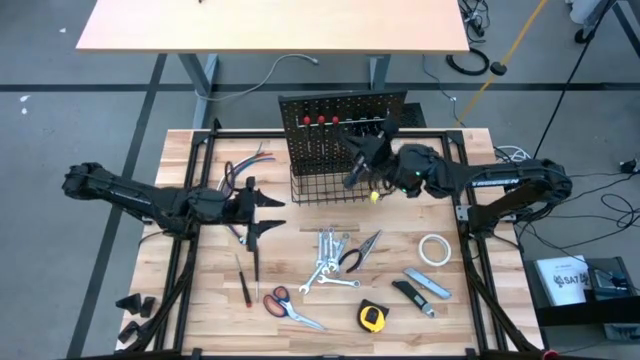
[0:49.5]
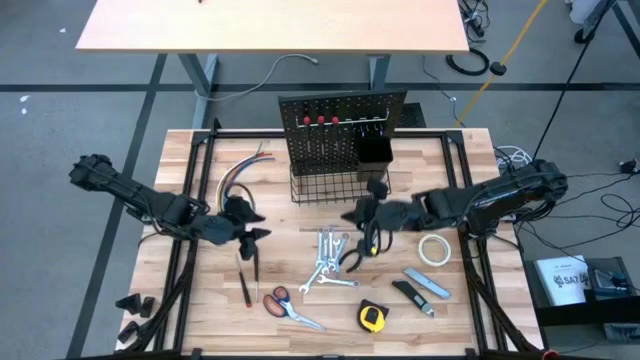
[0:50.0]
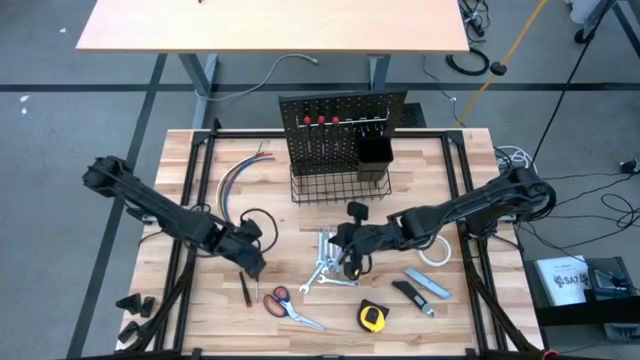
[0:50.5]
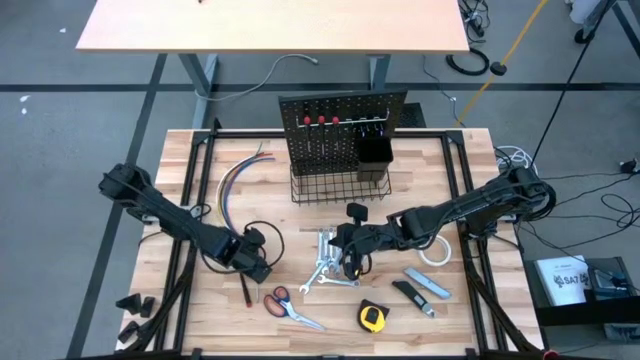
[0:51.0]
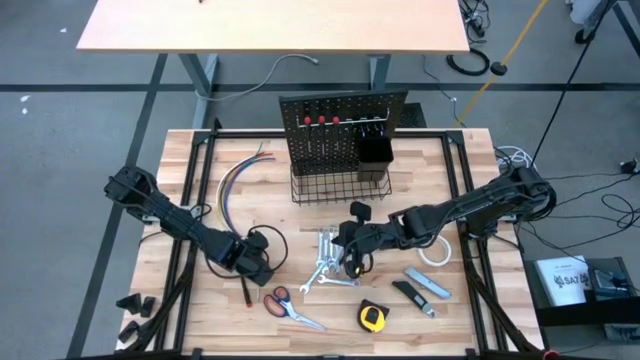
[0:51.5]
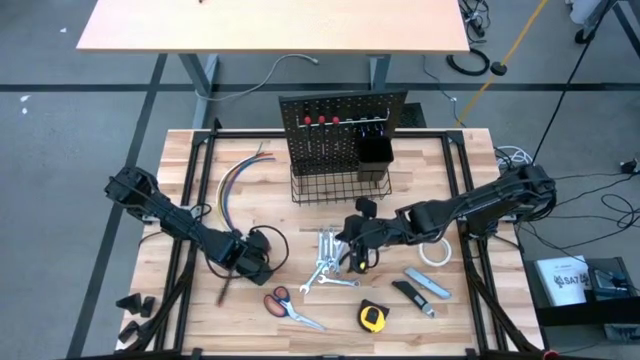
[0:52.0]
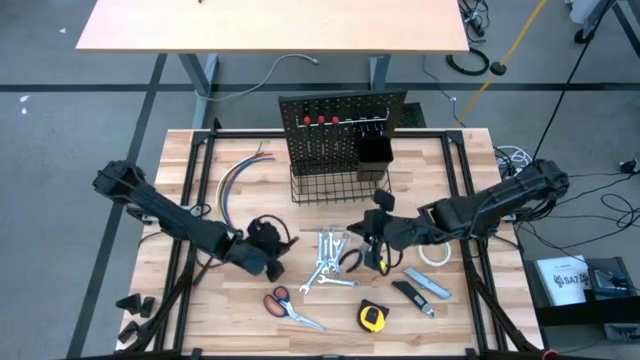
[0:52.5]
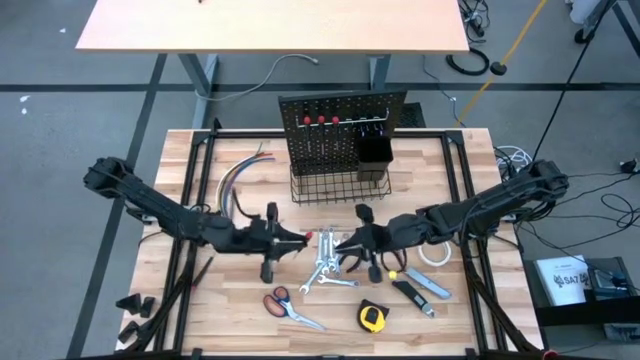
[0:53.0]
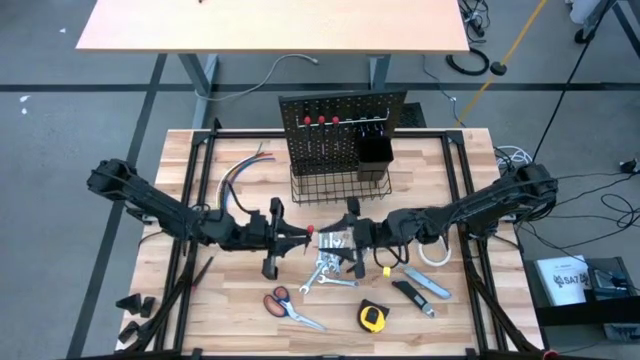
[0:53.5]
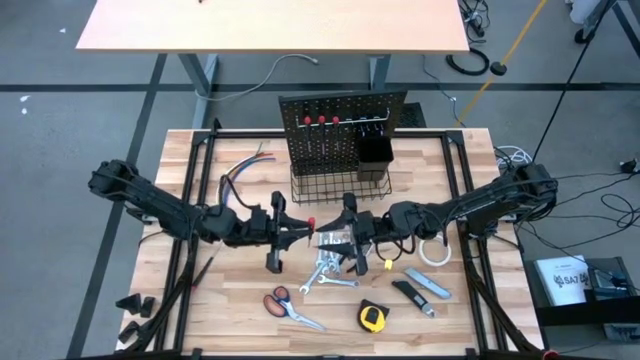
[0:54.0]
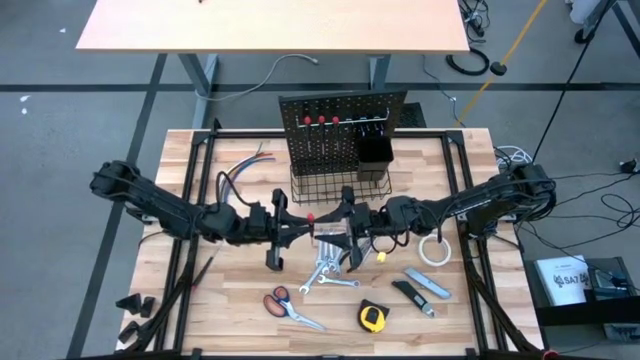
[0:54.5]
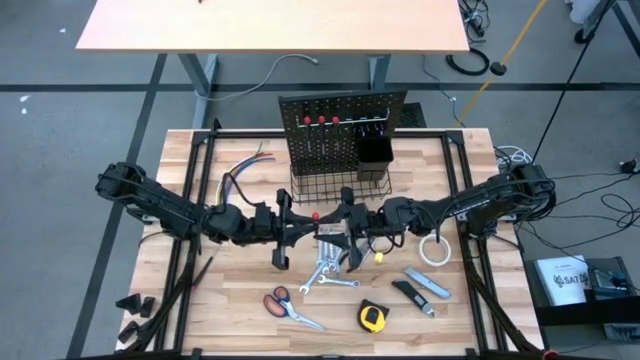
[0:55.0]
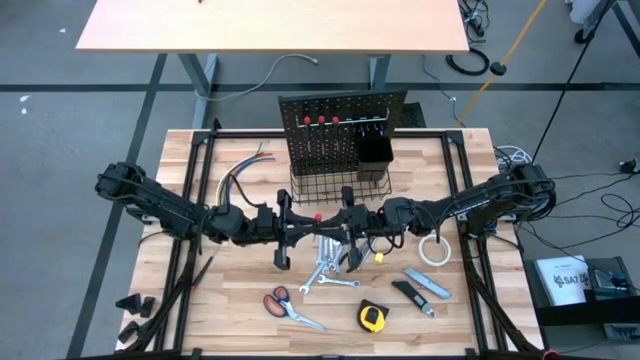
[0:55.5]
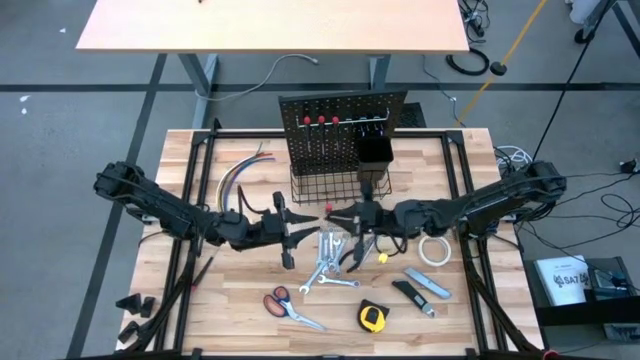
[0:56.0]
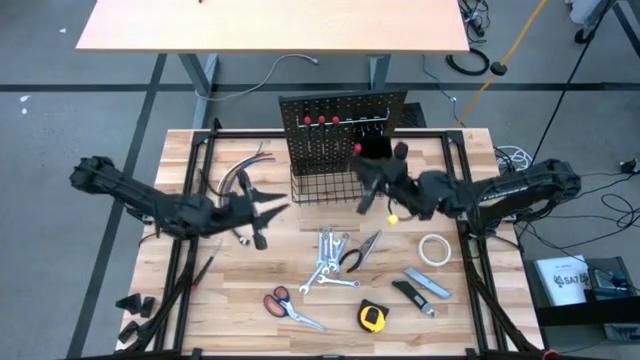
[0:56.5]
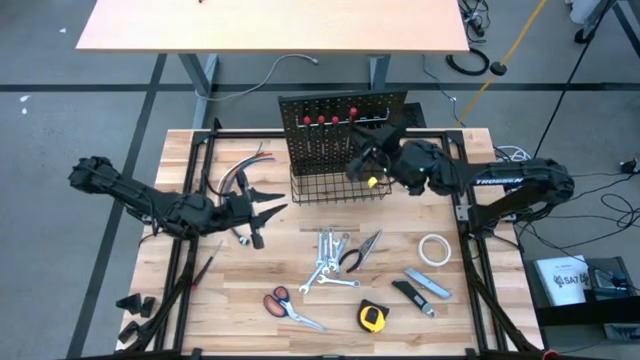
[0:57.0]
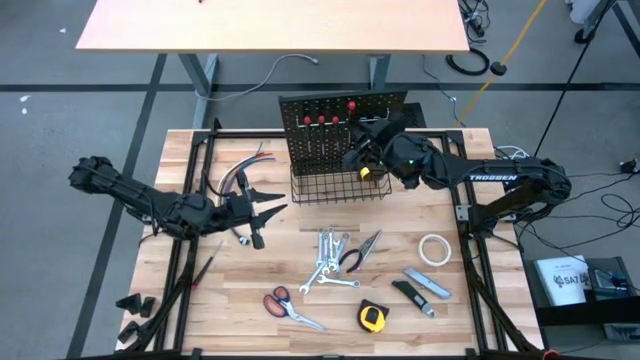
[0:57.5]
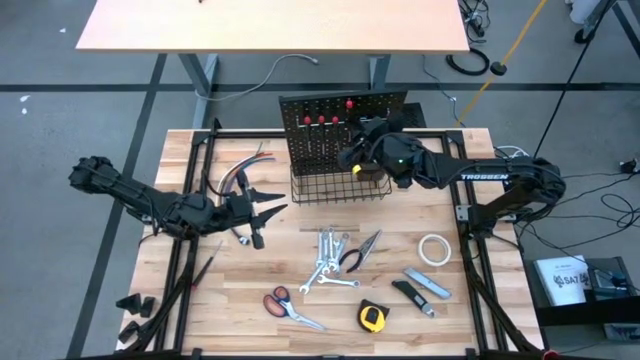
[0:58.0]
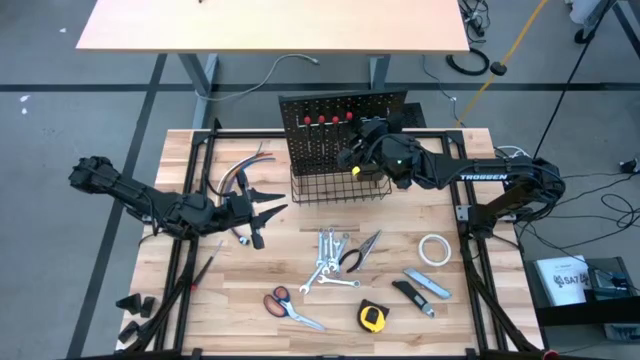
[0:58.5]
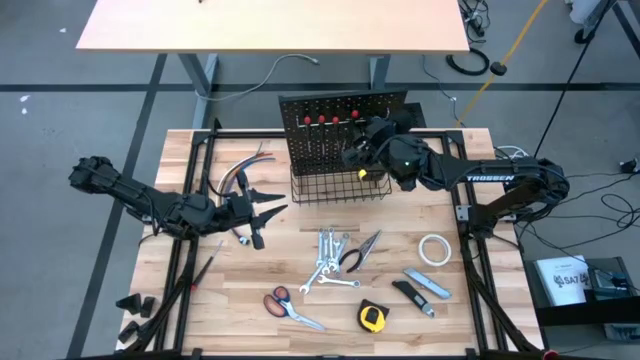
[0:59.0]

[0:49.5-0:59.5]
Task: Hang tools onto peg board
Hang the nut driver on the pegboard

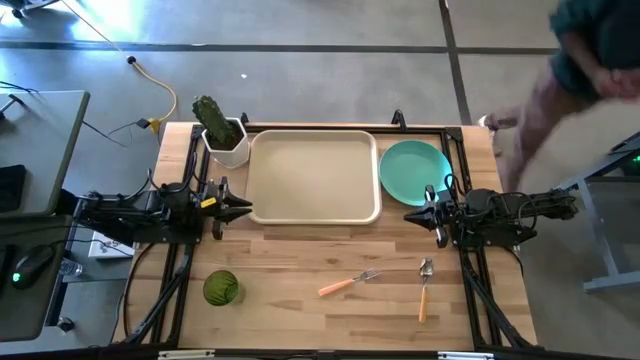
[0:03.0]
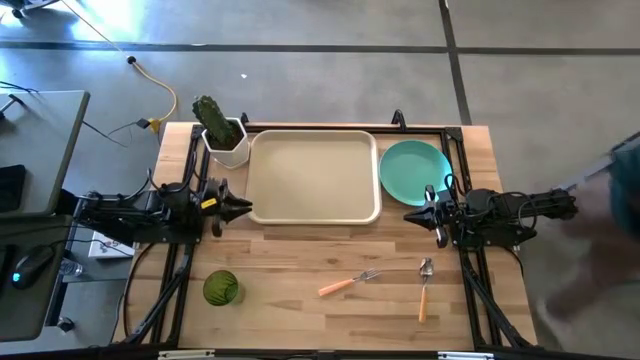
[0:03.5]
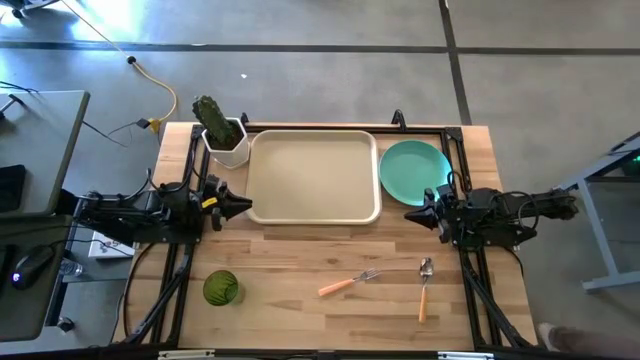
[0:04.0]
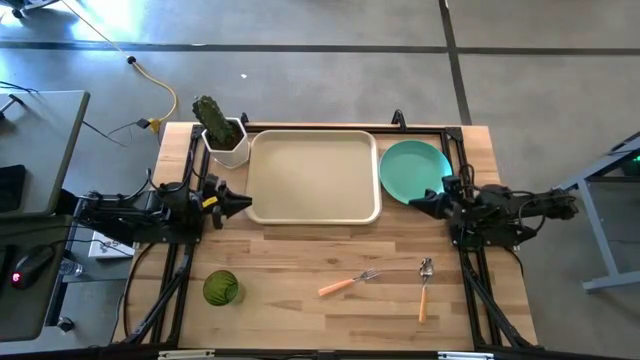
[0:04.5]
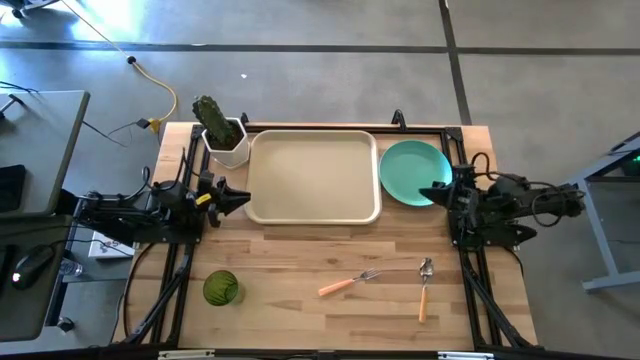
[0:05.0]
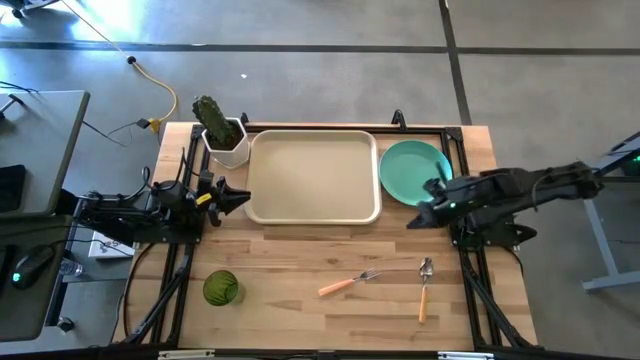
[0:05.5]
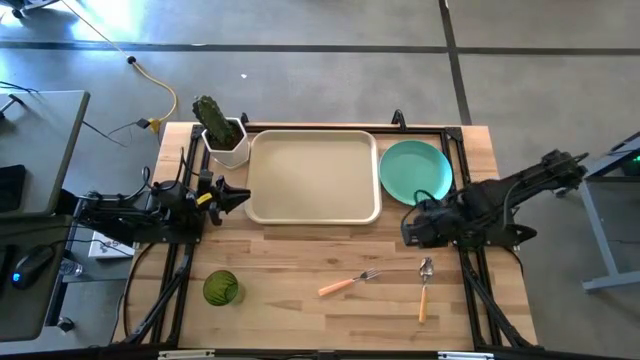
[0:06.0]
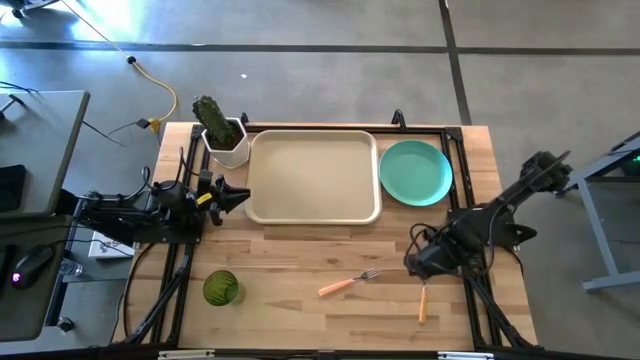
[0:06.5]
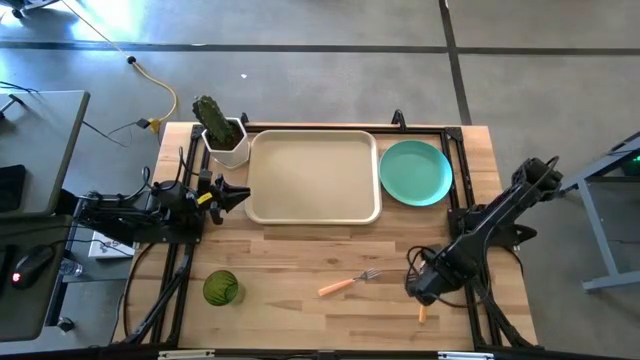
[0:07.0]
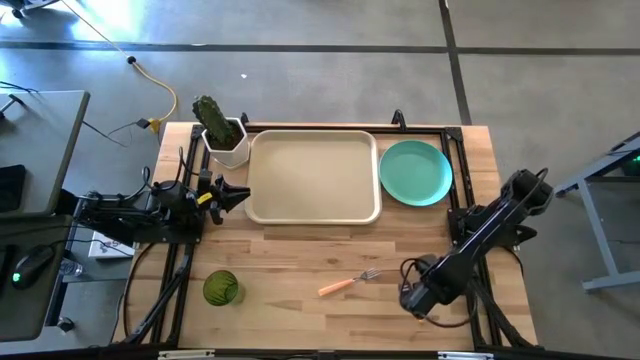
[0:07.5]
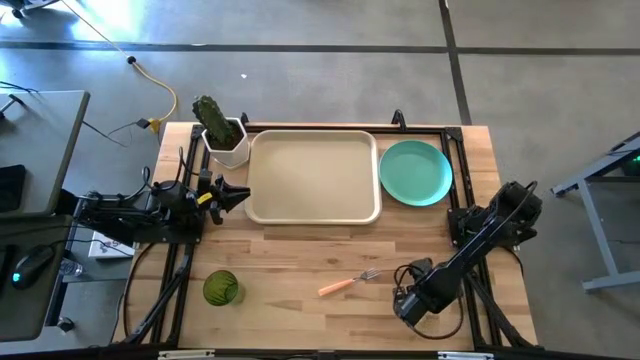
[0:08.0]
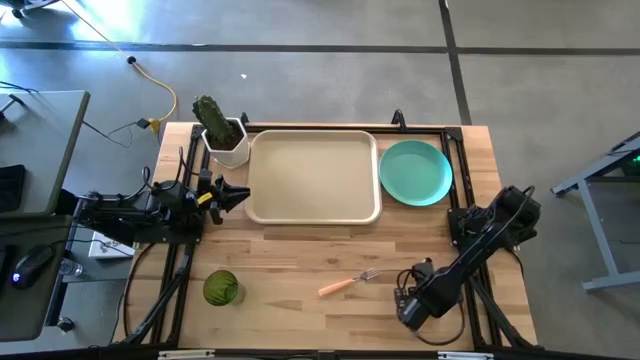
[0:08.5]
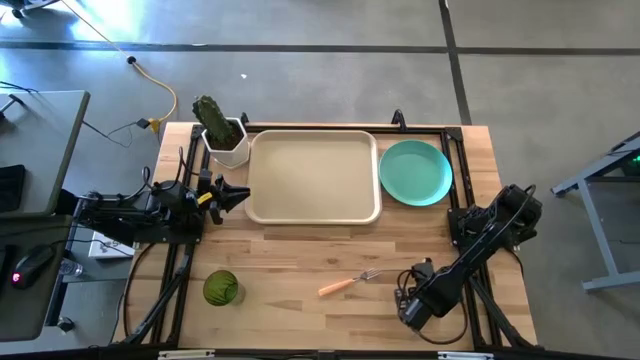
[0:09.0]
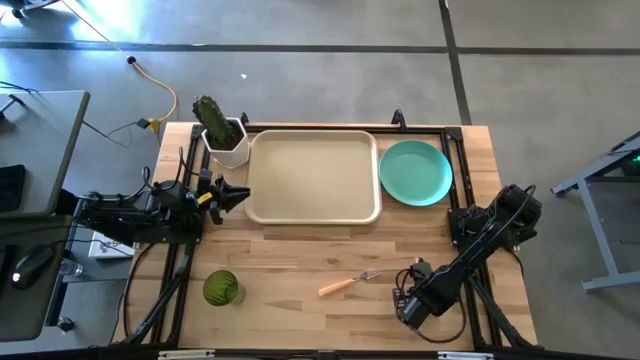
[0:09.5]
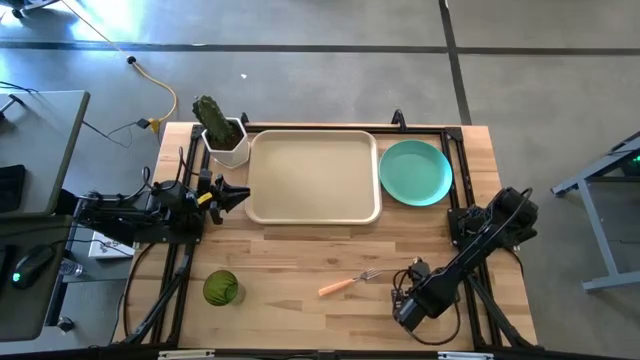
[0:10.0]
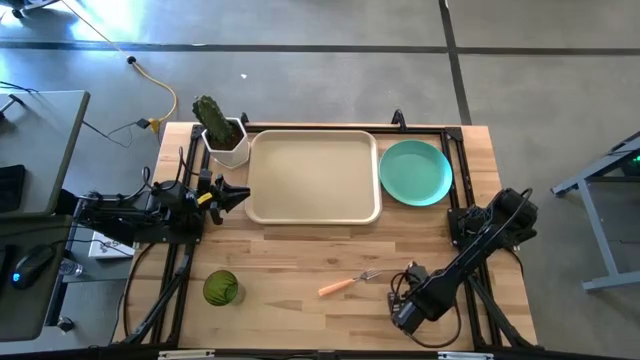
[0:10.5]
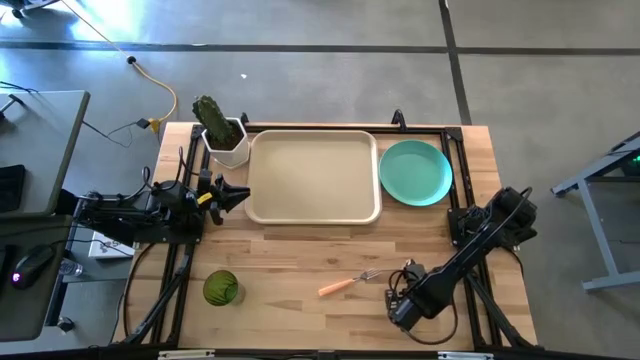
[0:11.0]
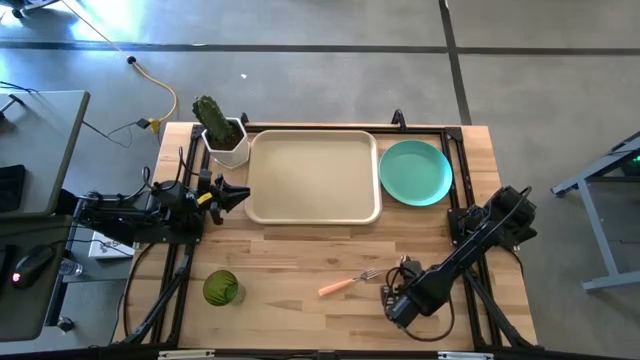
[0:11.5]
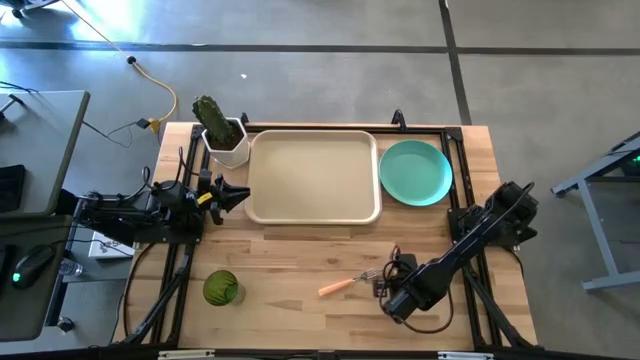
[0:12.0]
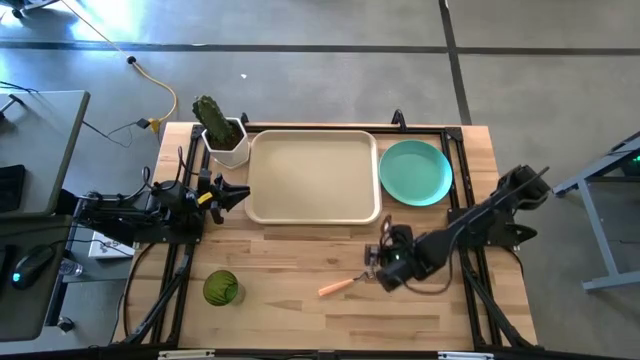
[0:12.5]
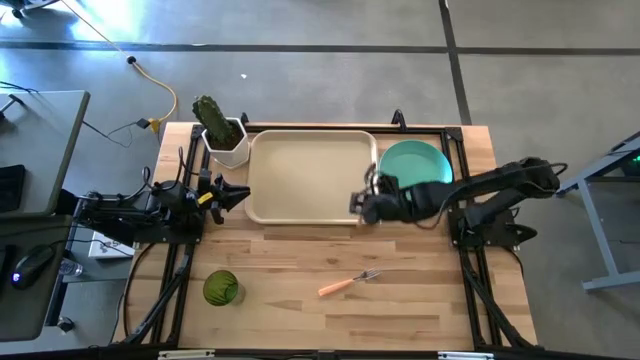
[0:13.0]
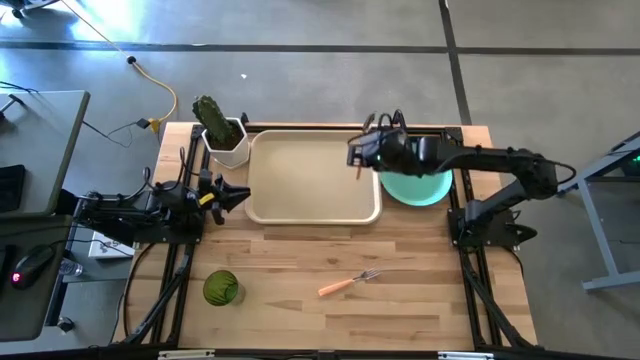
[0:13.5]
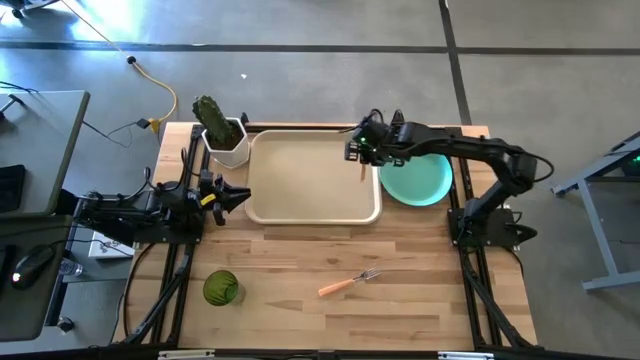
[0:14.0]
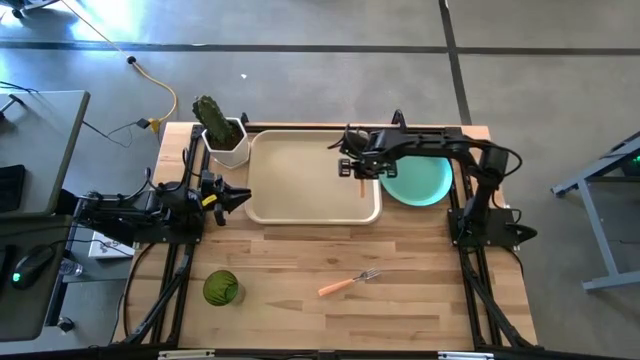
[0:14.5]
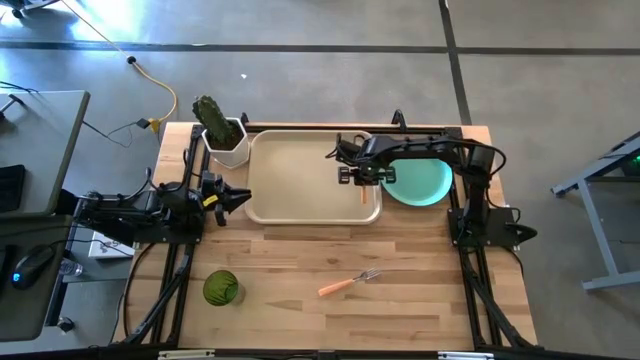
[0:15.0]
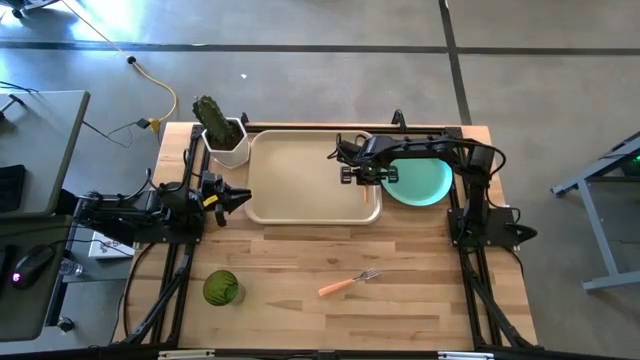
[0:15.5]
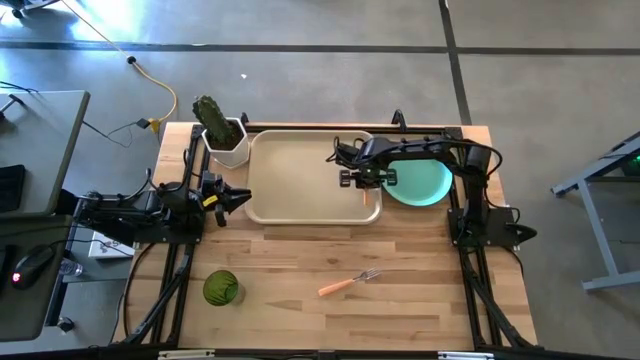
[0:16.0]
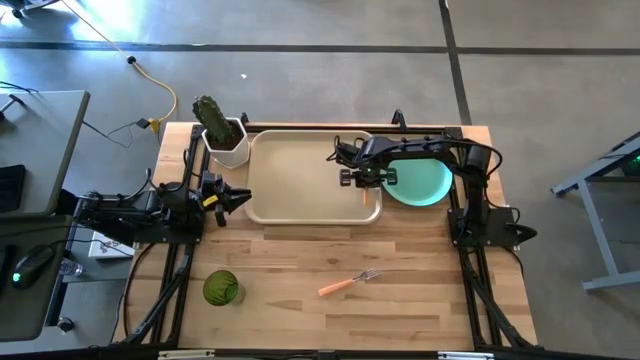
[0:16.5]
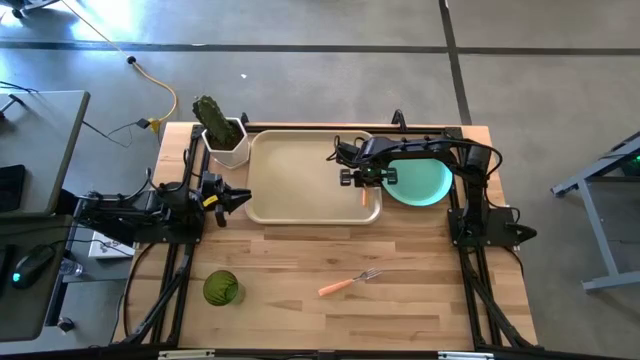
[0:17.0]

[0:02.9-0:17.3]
Task: Pick and place plate/cup/fork/spoon on tray
Put the orange spoon on the white serving tray
